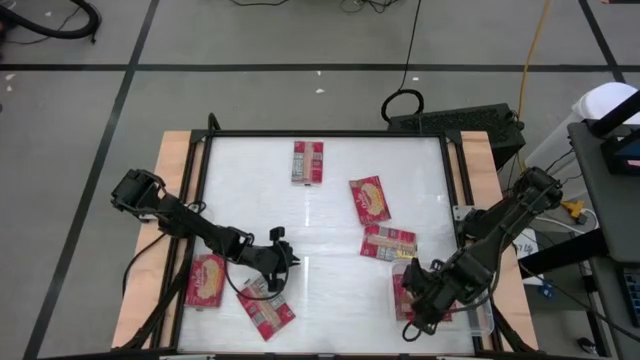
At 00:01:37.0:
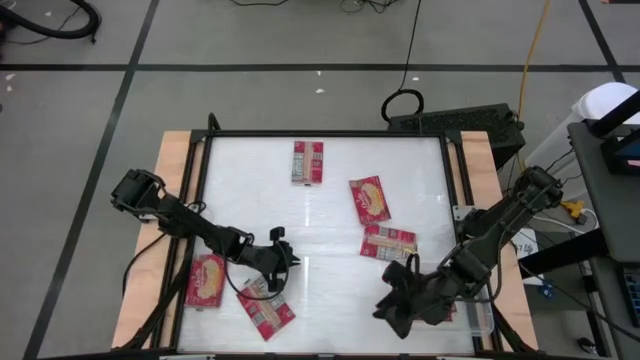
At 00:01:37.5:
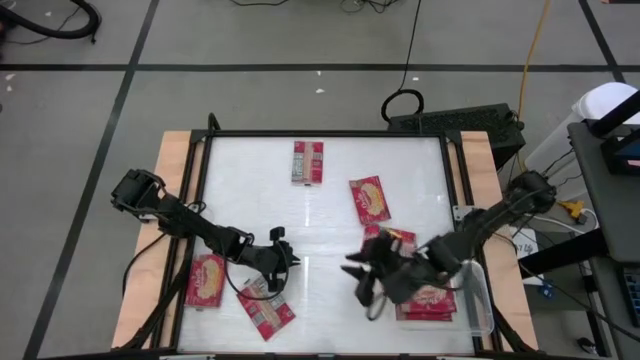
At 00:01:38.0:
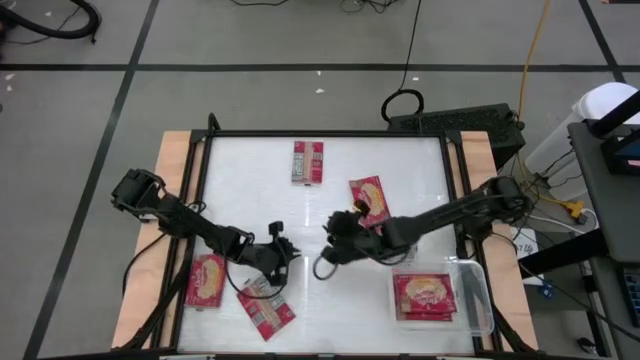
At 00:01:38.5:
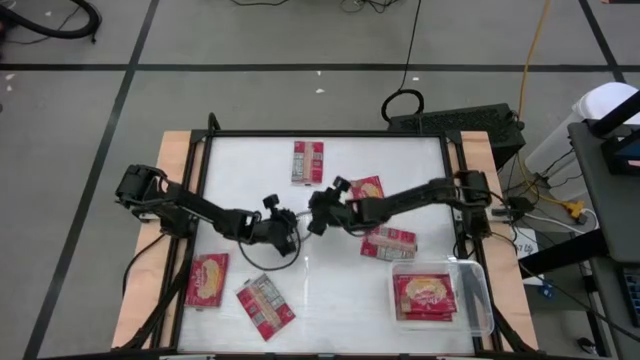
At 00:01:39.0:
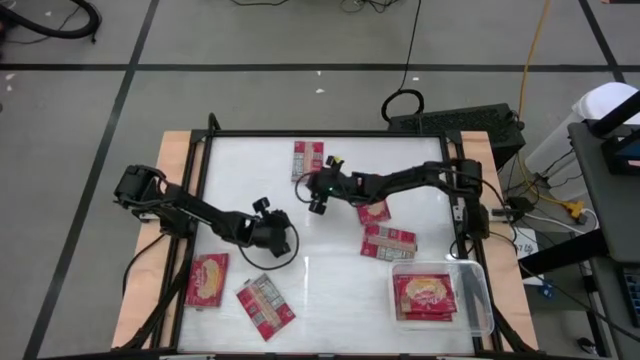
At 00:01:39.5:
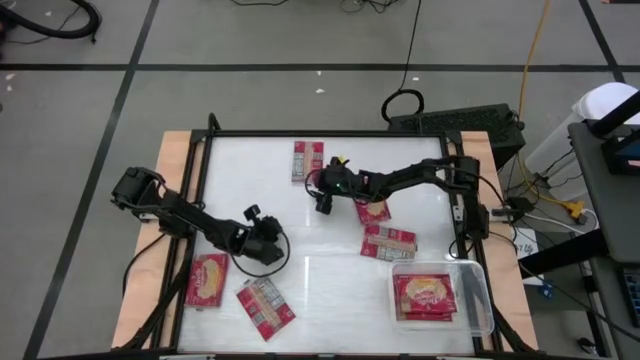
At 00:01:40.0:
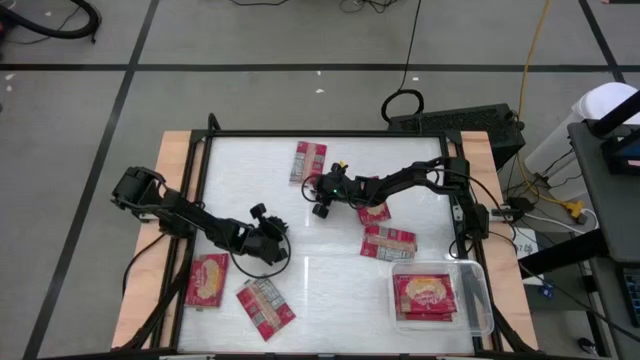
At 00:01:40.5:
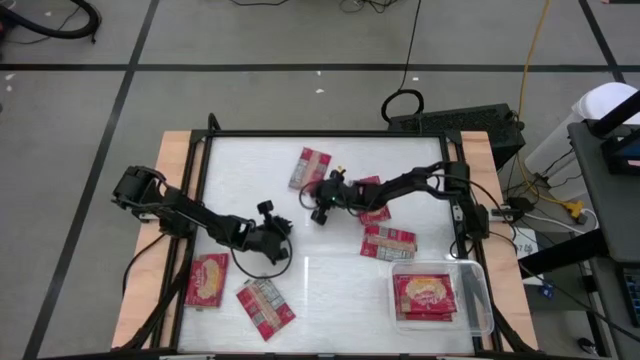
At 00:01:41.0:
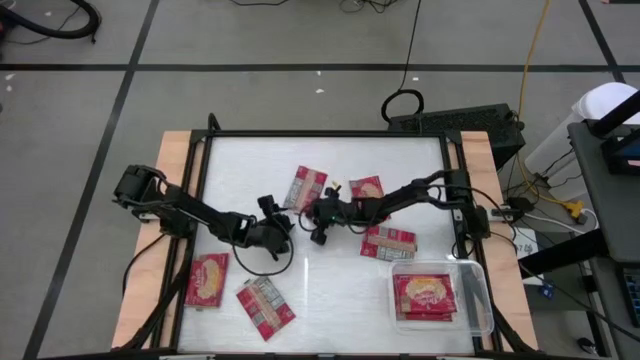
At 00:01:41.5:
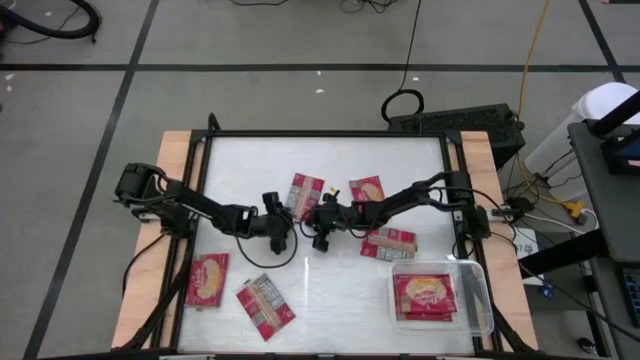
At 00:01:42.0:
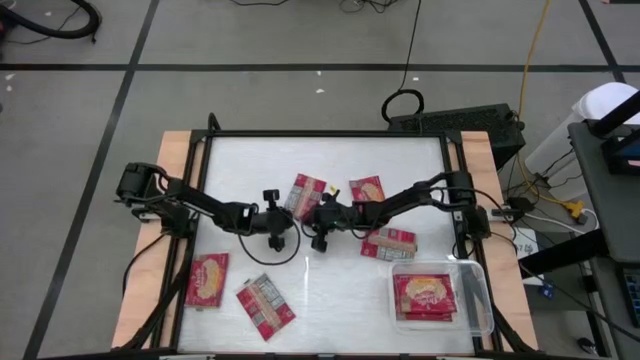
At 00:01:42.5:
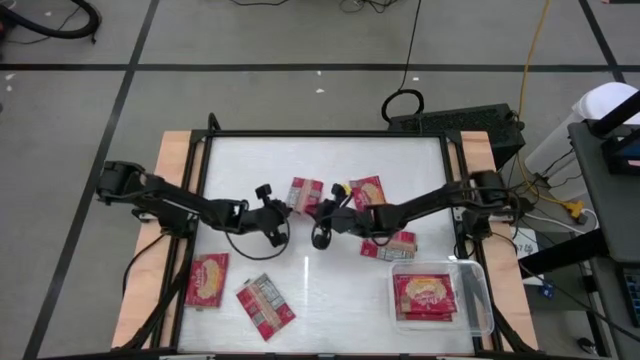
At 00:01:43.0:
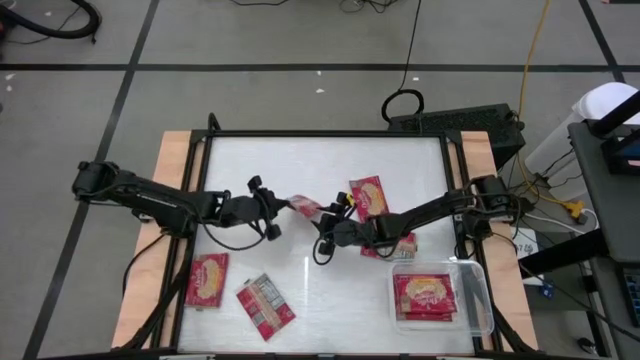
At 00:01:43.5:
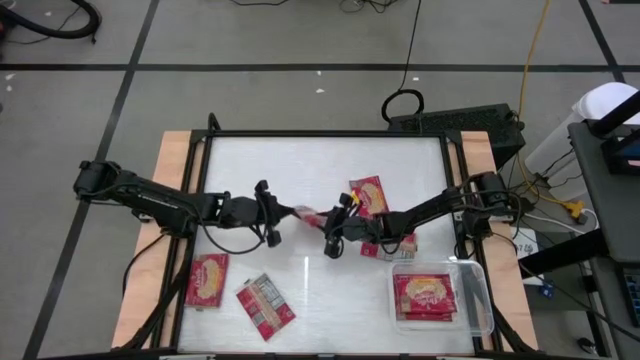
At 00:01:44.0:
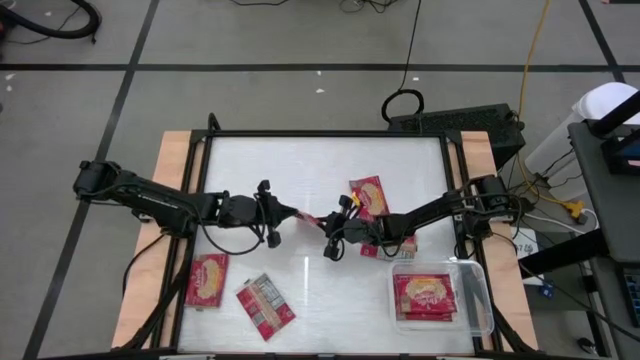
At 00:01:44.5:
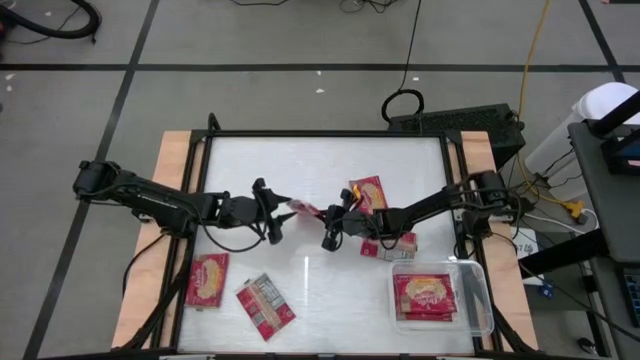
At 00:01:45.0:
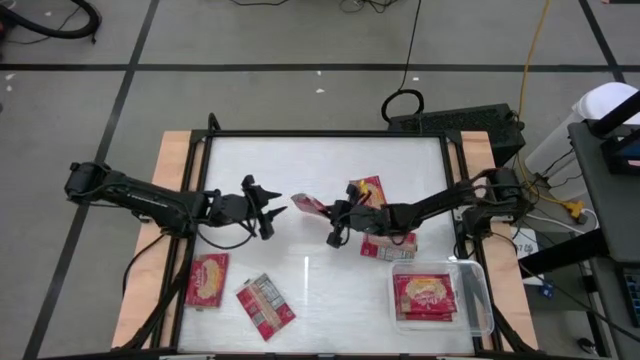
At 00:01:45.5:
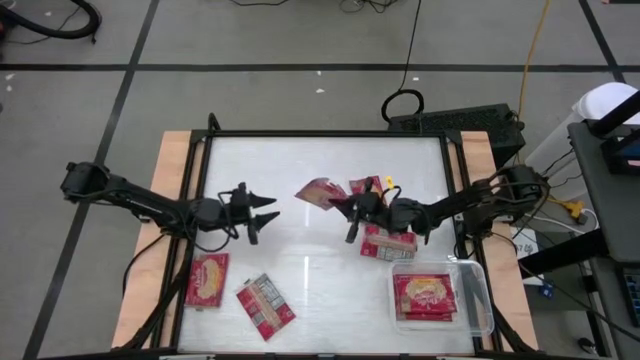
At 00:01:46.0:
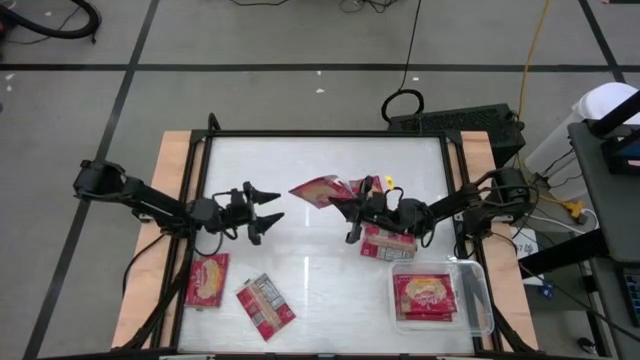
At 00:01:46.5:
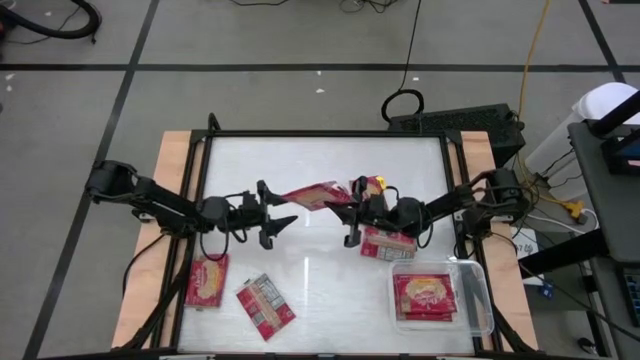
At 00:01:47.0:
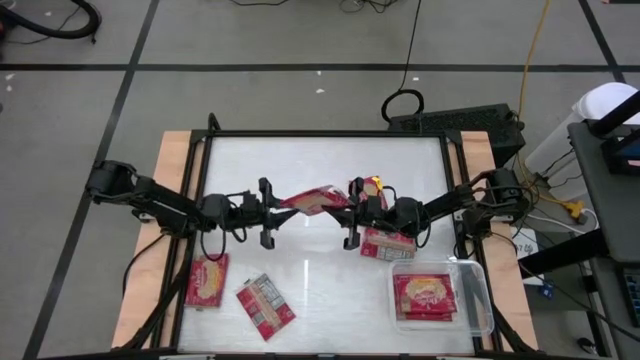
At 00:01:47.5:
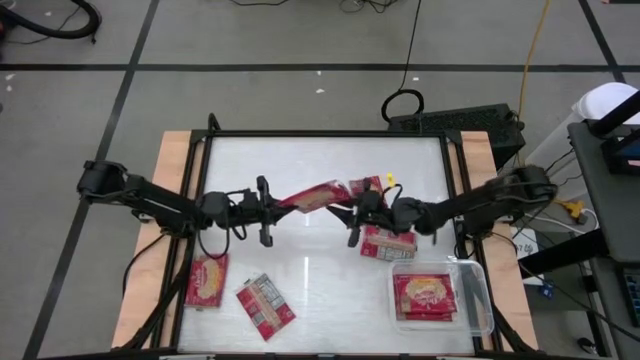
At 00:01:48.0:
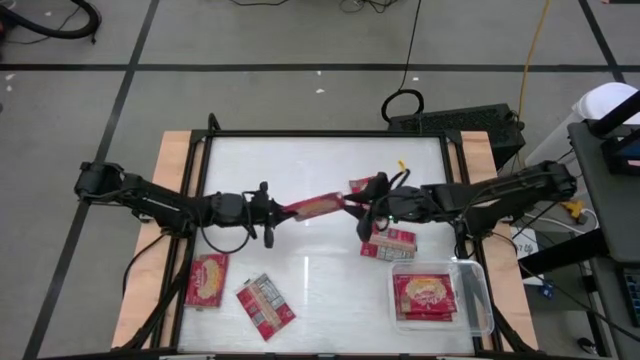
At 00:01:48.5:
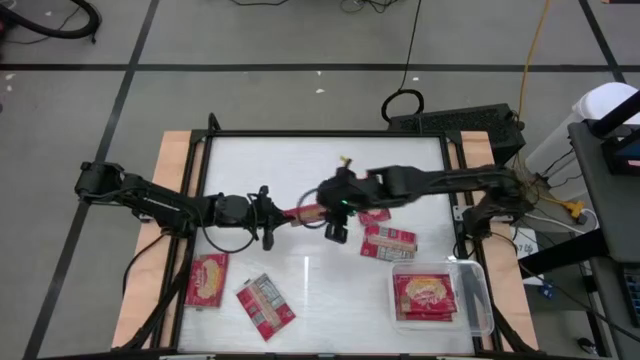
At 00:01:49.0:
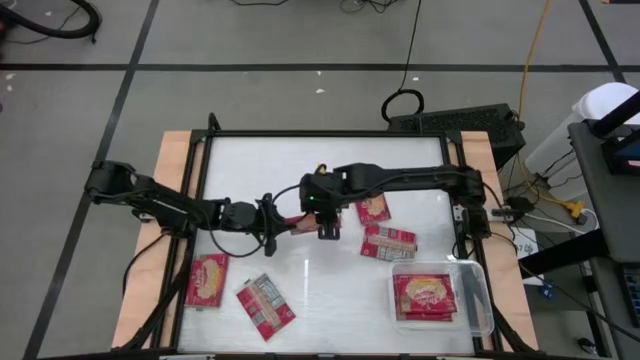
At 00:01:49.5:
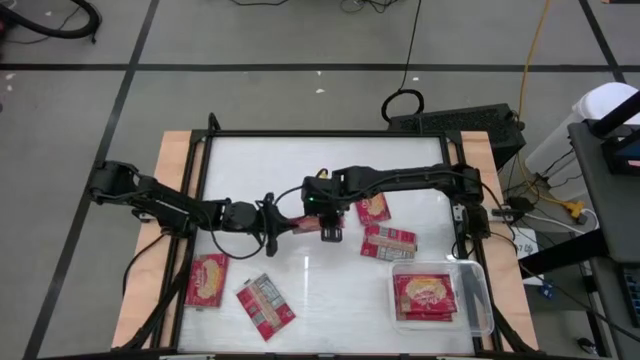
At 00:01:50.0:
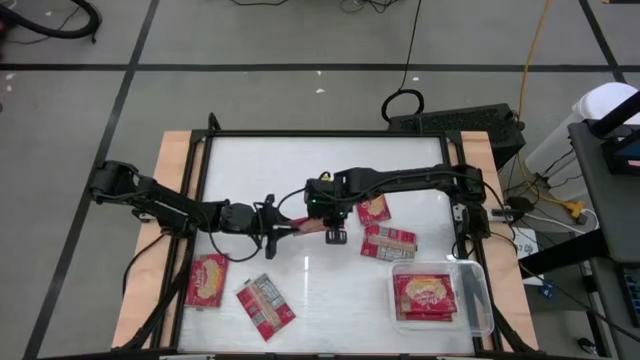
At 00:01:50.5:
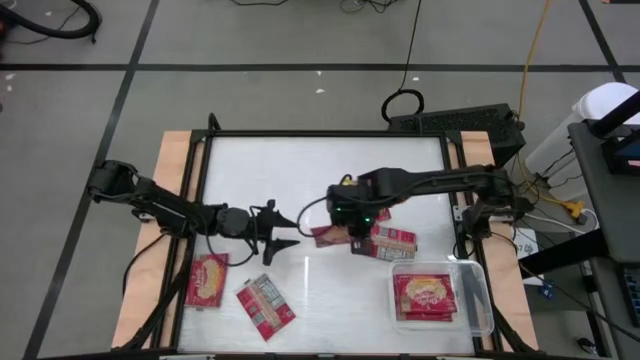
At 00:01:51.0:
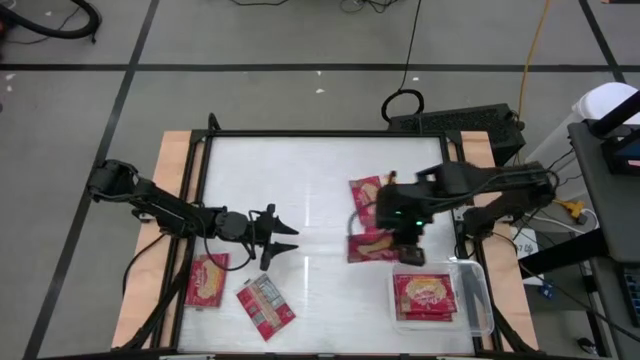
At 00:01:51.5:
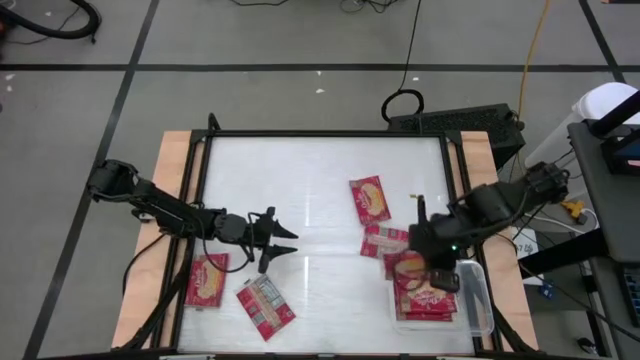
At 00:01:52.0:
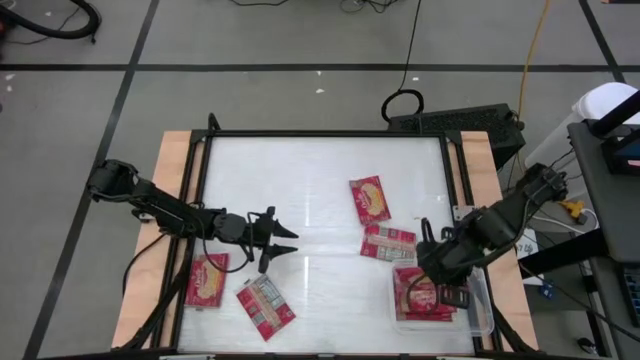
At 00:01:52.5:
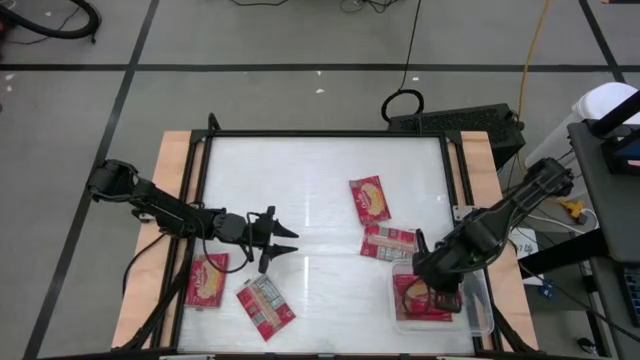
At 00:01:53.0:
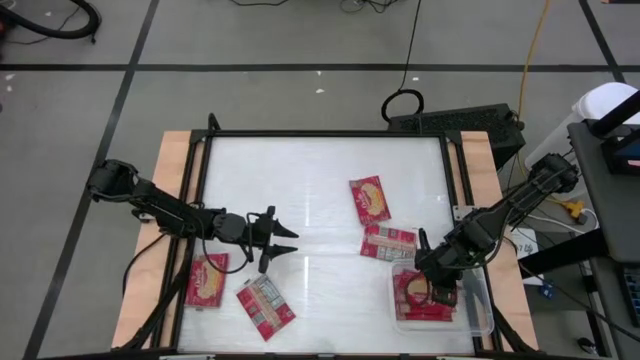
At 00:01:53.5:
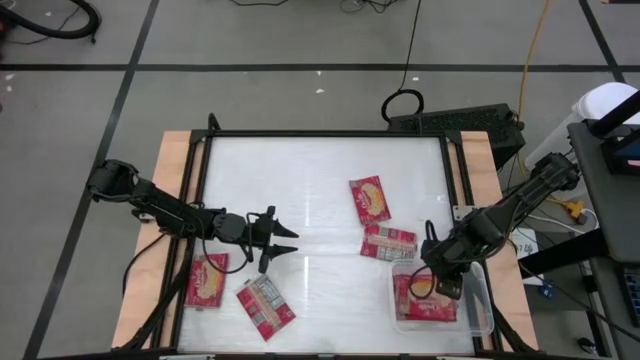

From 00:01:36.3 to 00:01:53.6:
Task: Sort popcorn bags into baskets
Put the red popcorn pack into the transparent bin

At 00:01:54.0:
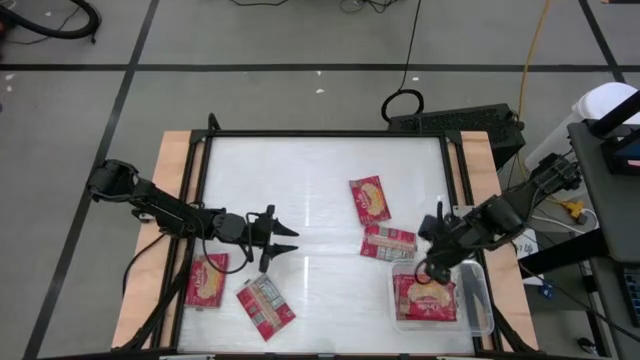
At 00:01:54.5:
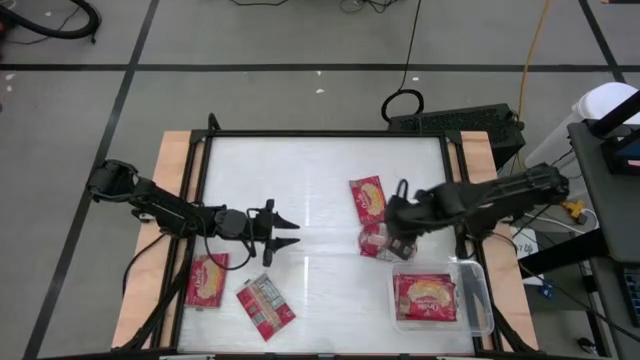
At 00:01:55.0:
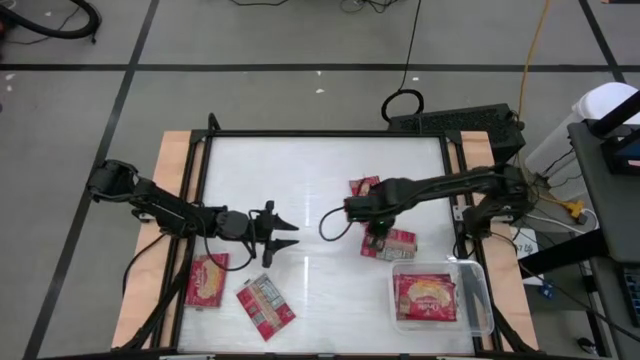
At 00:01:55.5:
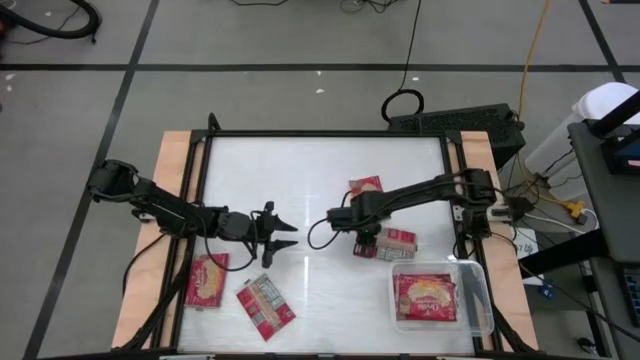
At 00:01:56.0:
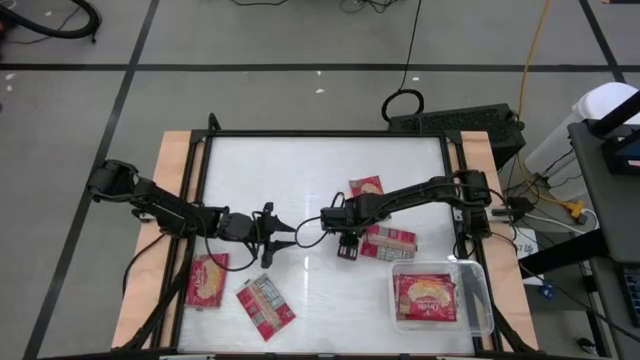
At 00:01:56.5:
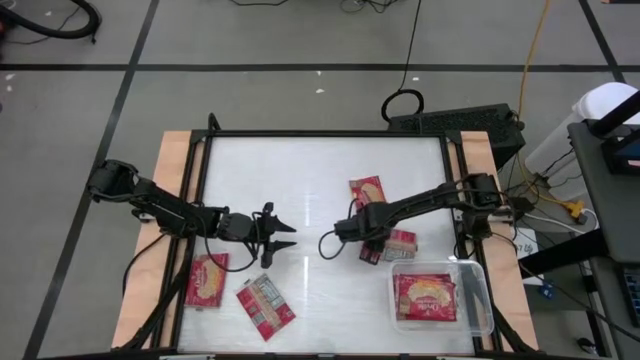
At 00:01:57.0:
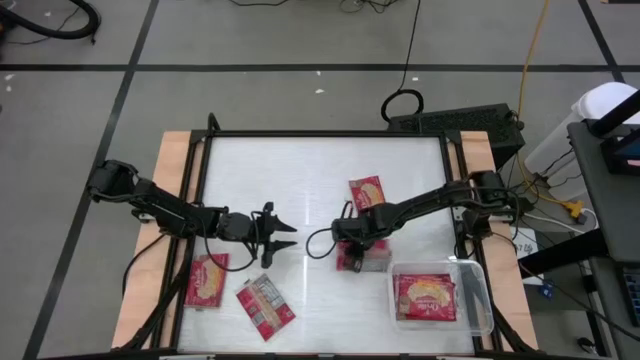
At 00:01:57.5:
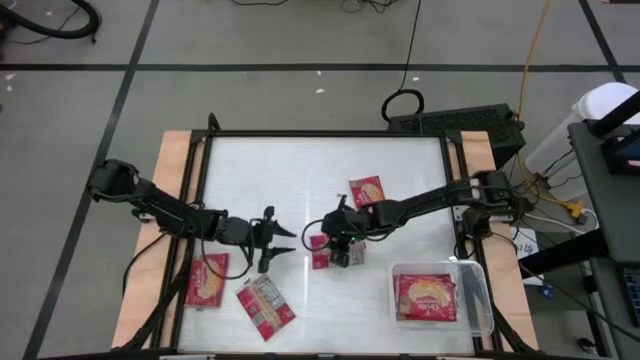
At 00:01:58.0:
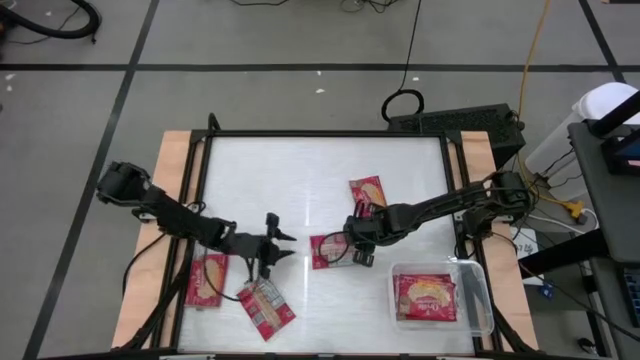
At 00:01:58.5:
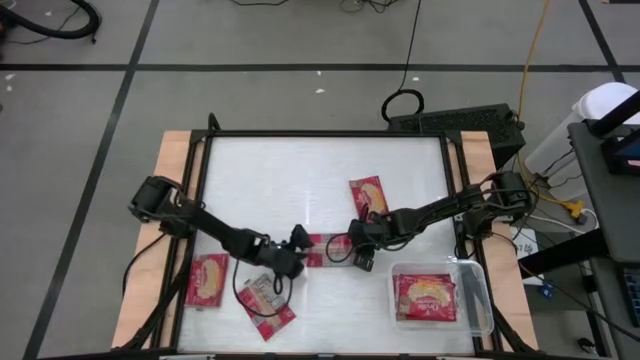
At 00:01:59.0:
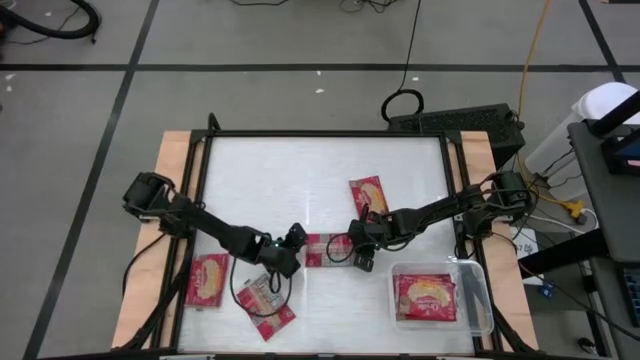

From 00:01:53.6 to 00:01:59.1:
Put the red popcorn pack into the transparent bin
